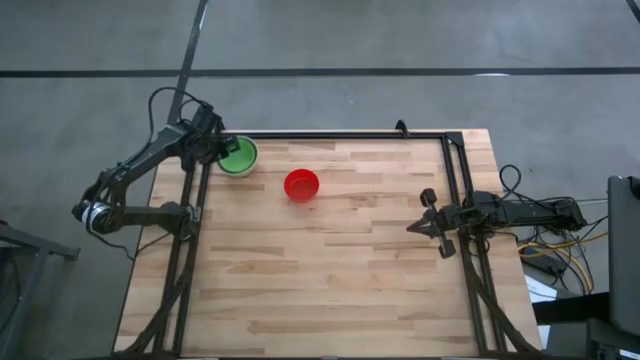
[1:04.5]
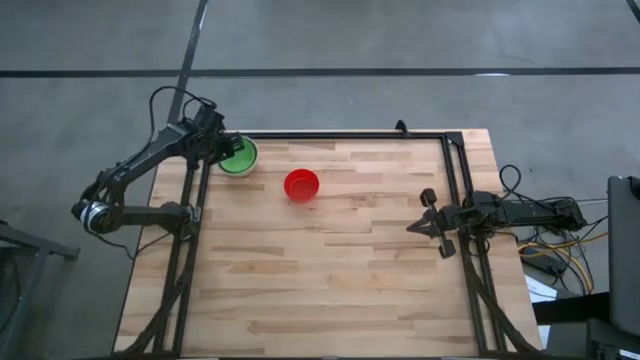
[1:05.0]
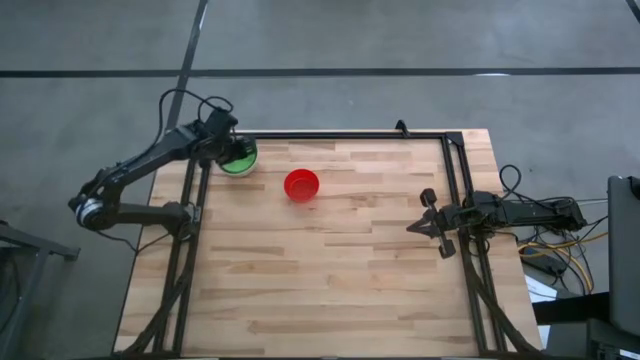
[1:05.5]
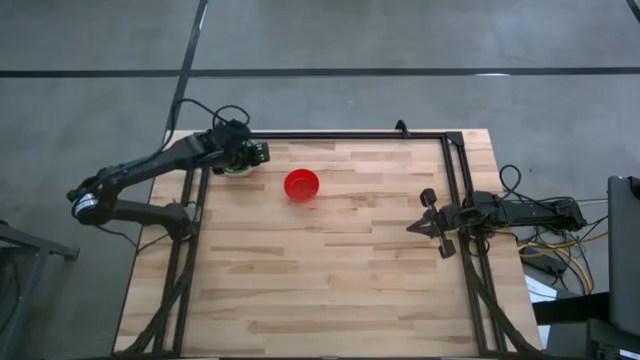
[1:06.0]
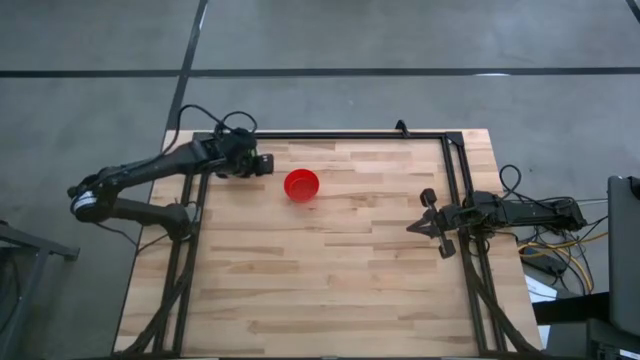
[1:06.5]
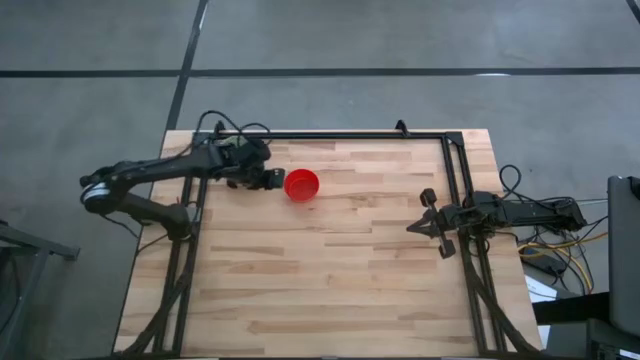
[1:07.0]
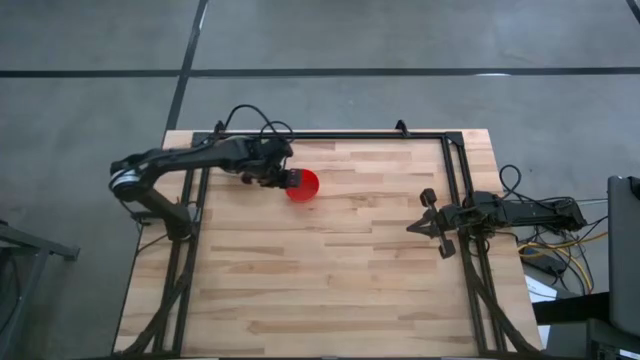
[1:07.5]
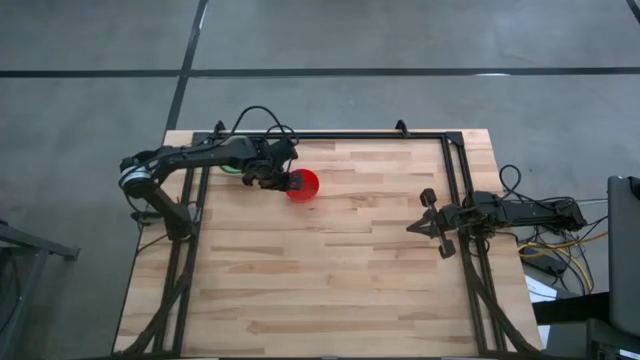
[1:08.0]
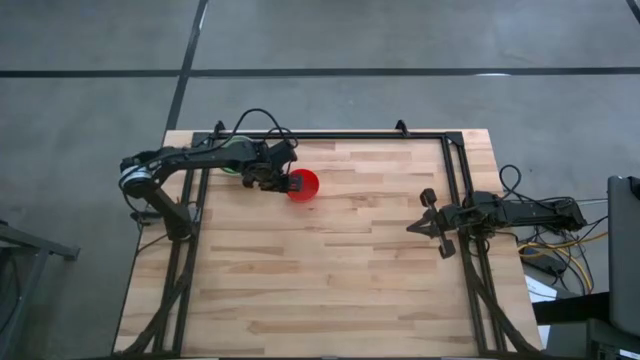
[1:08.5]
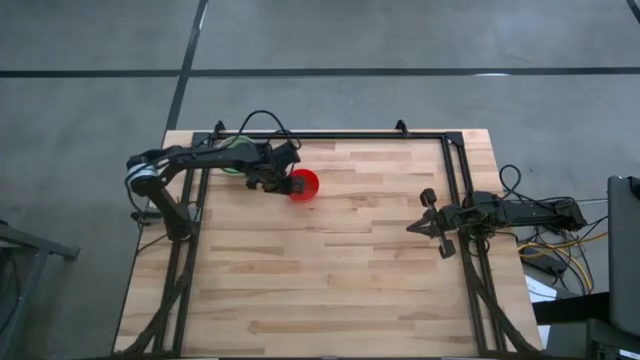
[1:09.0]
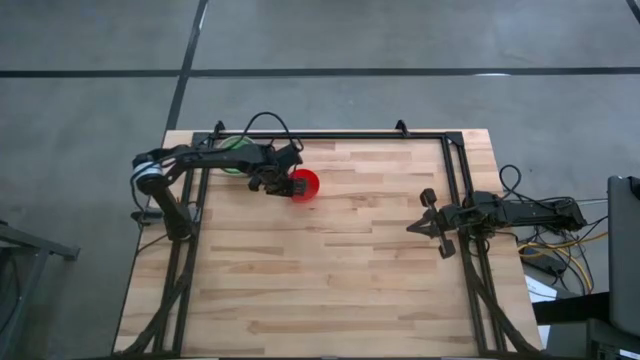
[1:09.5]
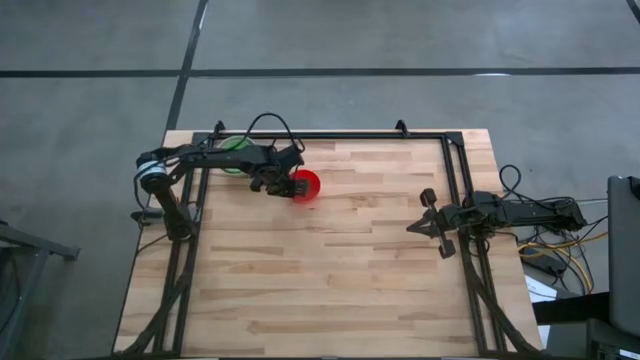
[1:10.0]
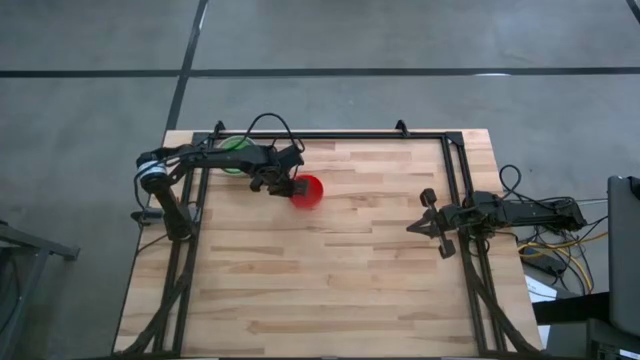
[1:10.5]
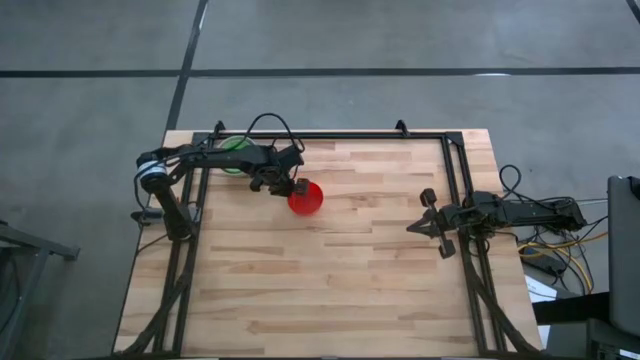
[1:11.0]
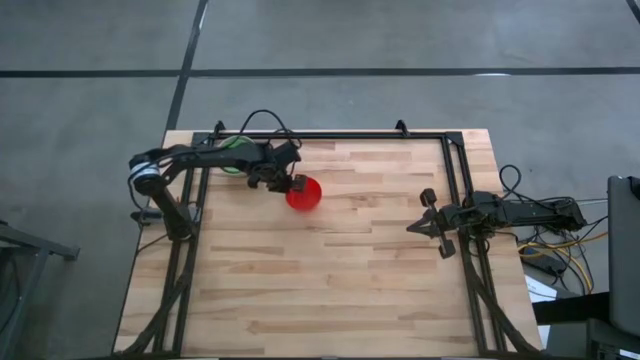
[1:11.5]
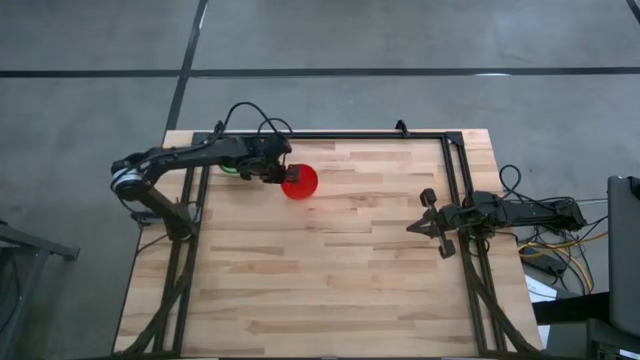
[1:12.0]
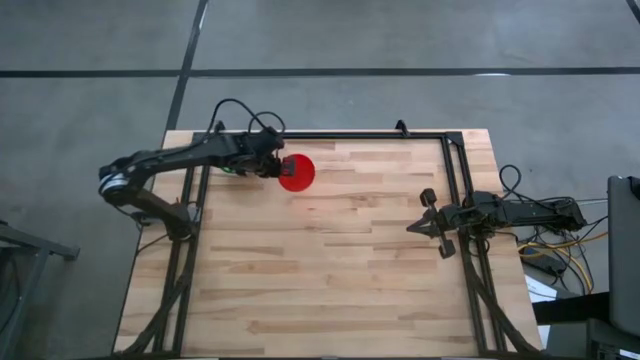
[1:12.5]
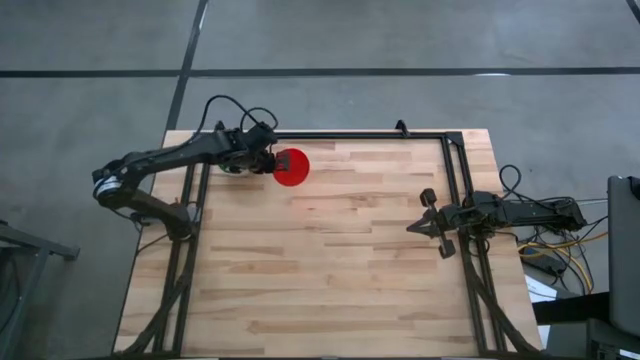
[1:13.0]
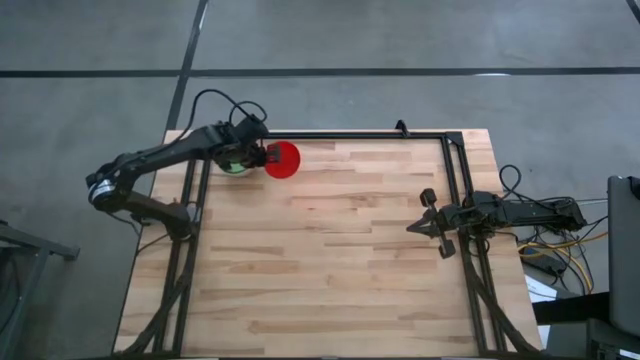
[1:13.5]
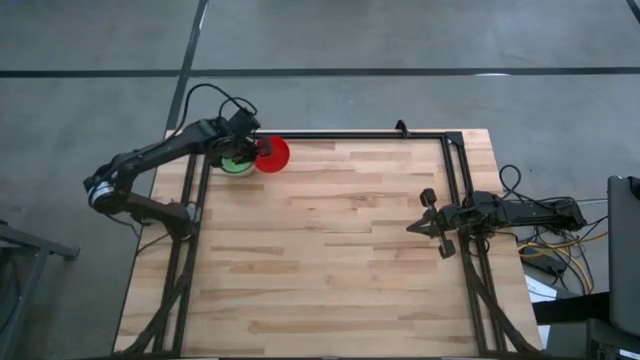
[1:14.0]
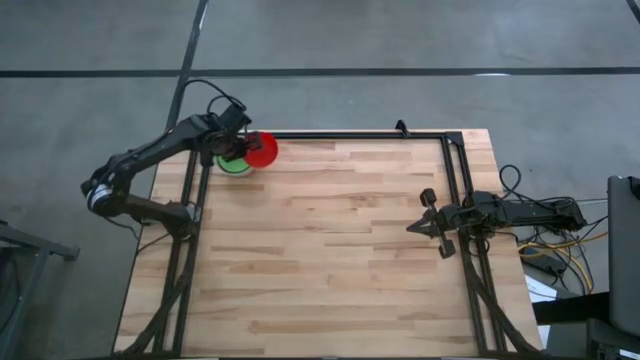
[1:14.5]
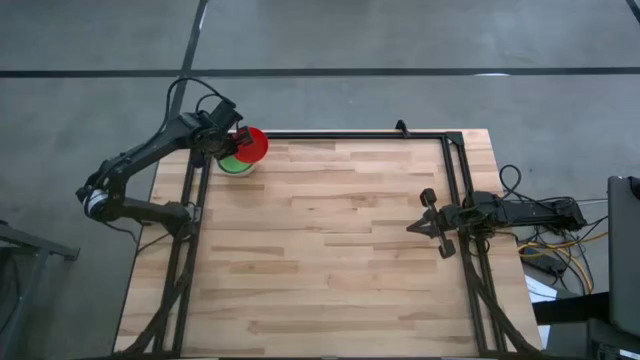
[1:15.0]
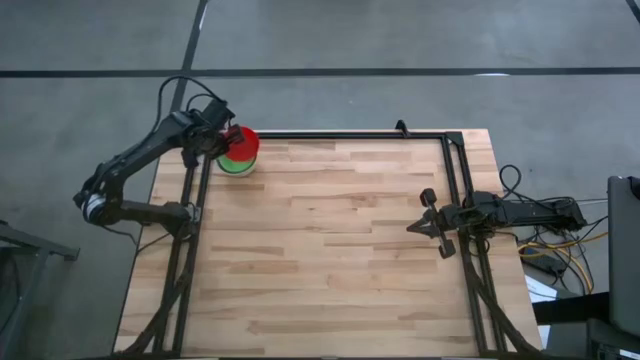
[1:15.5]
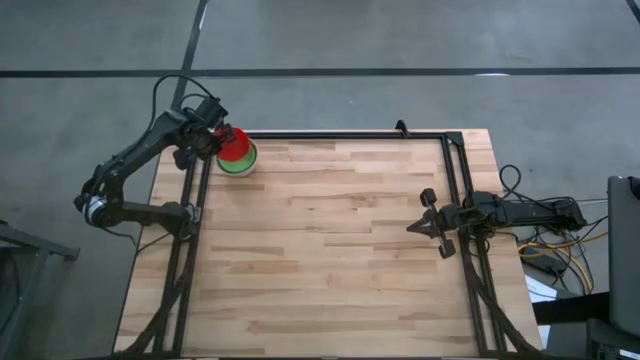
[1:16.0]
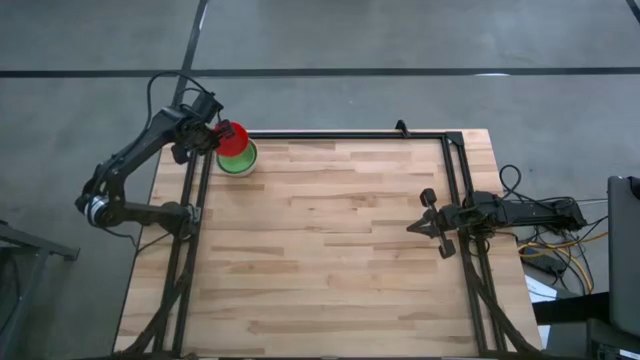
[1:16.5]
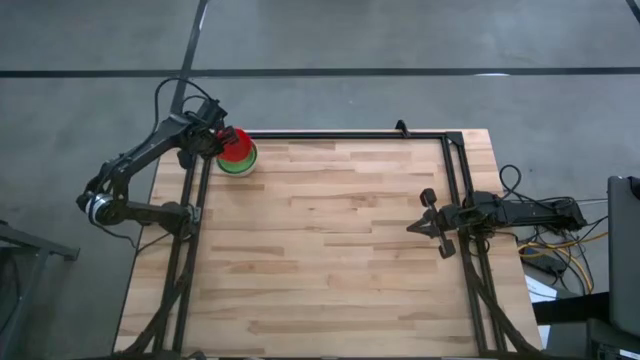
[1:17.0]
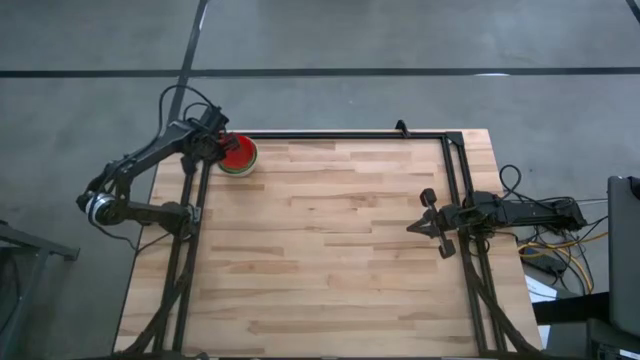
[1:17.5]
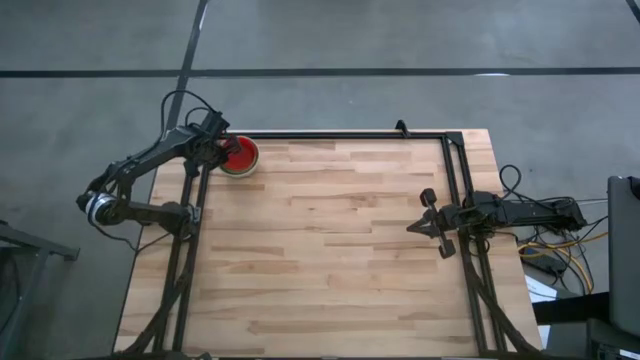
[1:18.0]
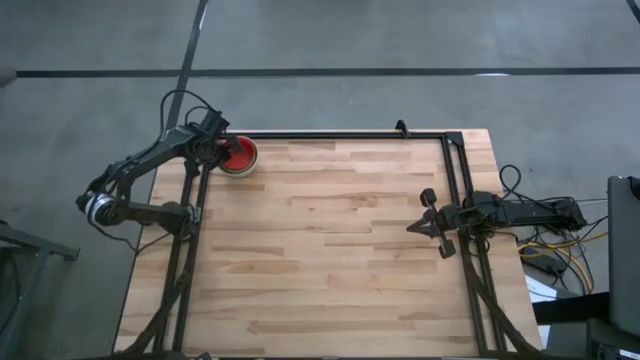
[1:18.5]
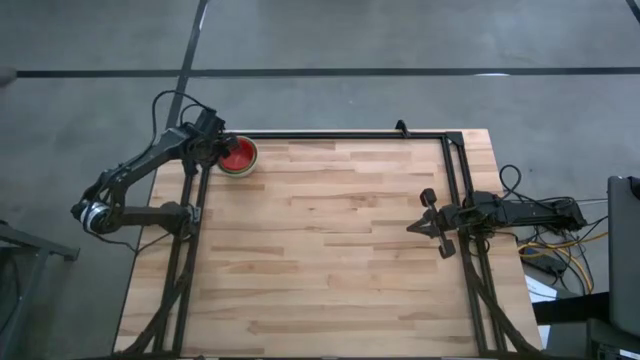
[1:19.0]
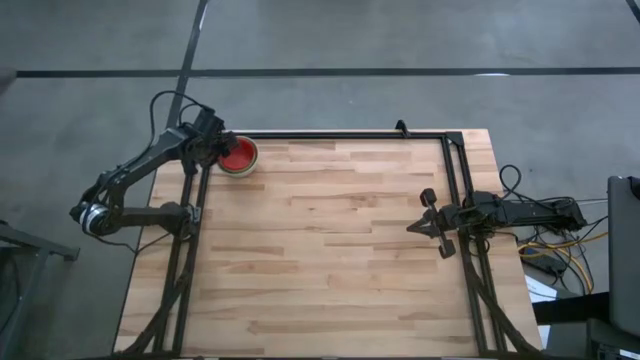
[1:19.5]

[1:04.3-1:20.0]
Stack the red bowl on the stacked bowls

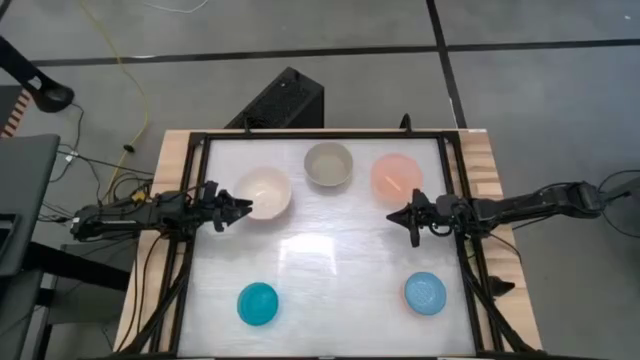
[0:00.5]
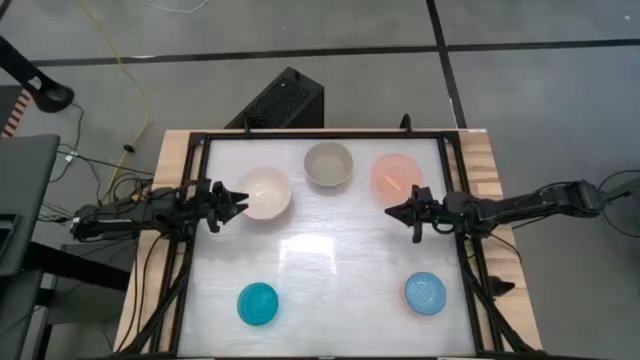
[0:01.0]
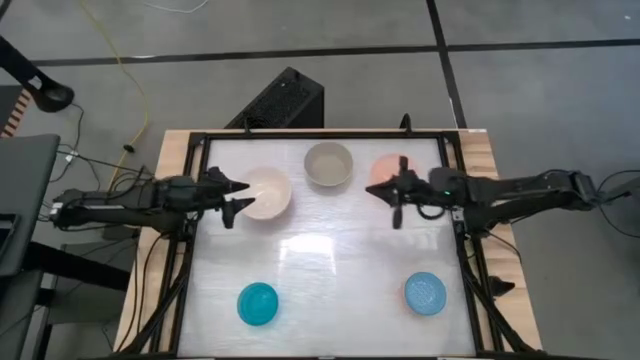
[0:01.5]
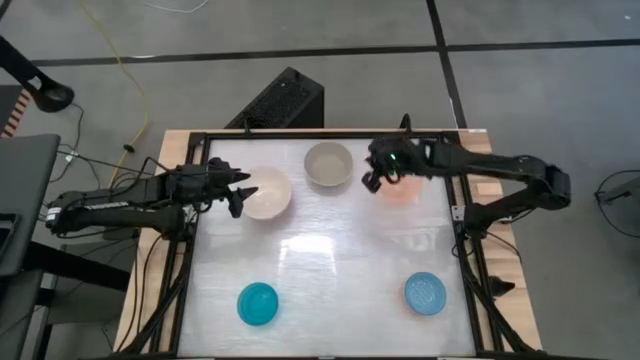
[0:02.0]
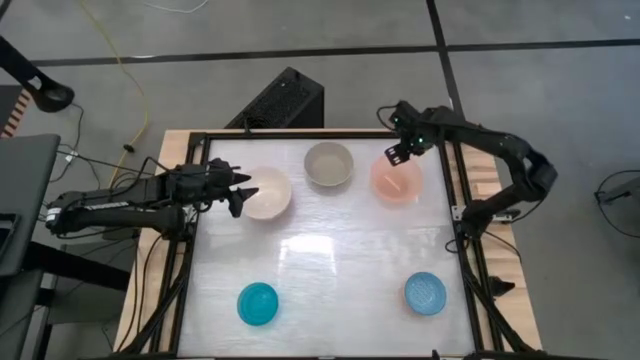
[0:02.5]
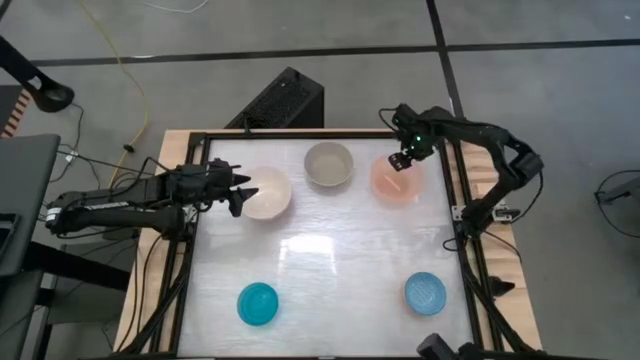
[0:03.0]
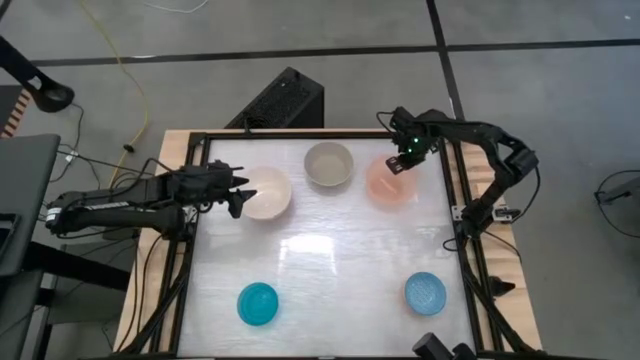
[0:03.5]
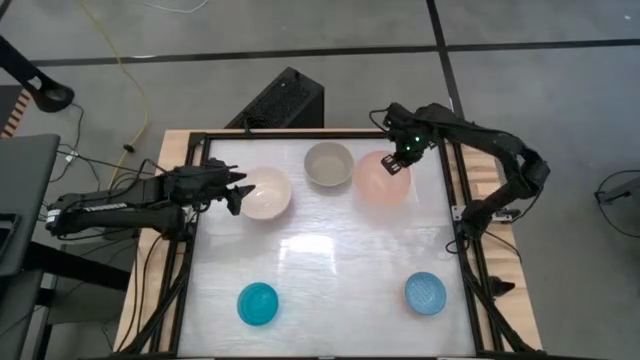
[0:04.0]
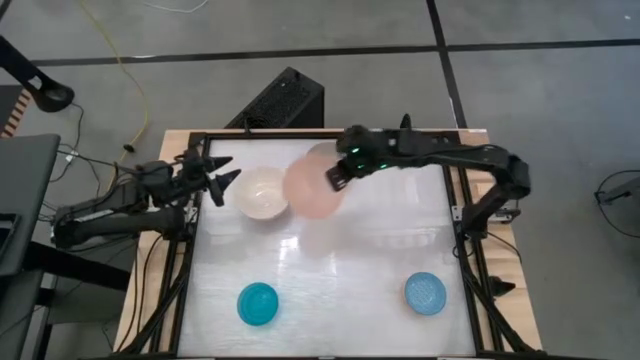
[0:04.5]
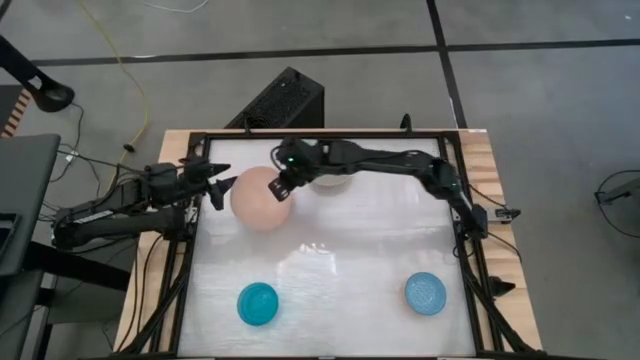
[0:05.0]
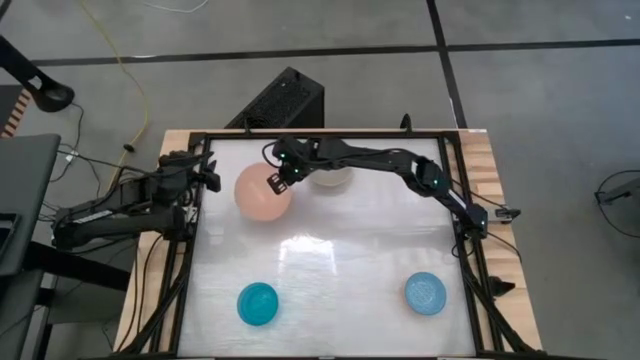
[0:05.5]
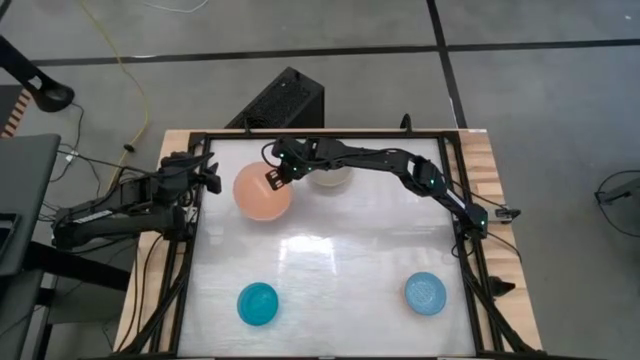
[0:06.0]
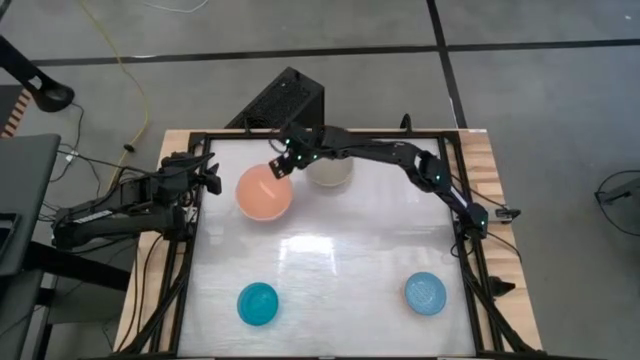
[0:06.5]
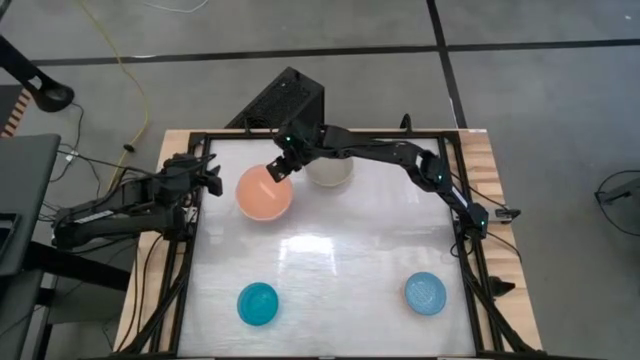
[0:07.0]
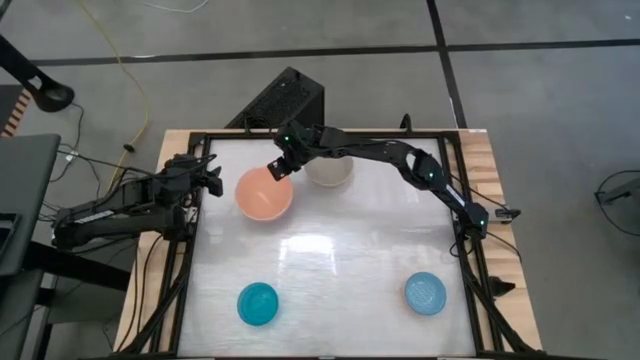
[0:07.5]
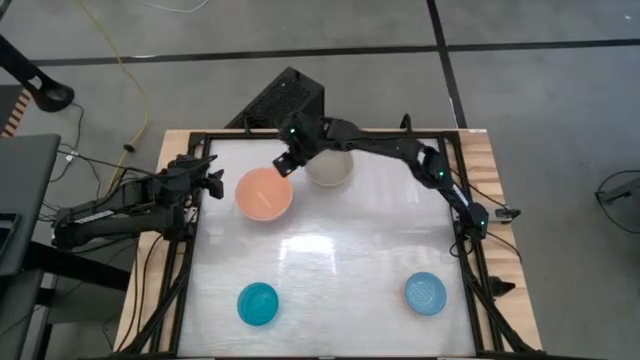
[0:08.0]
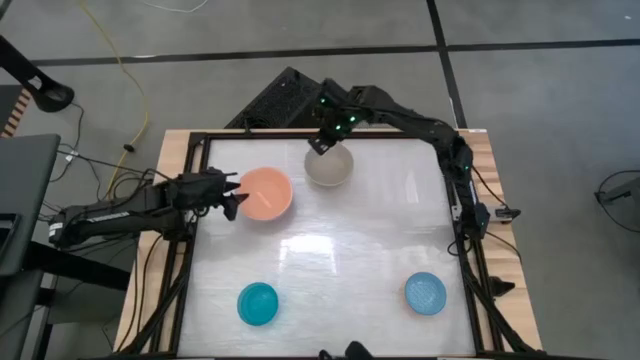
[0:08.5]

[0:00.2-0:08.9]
Stack the light orange bowl on top of the white bowl
